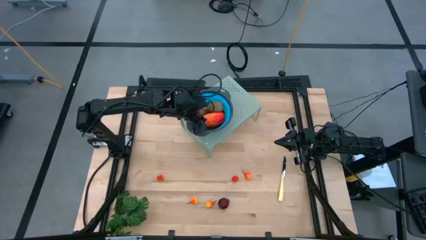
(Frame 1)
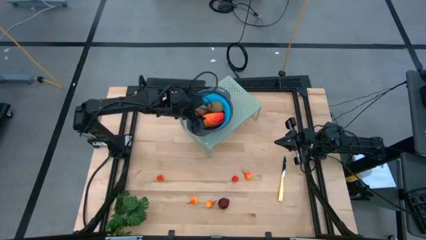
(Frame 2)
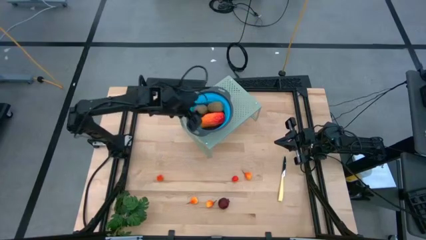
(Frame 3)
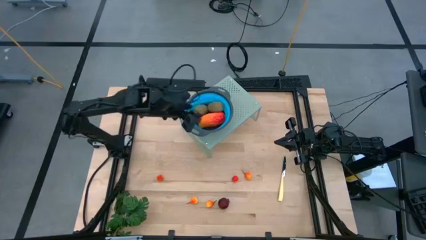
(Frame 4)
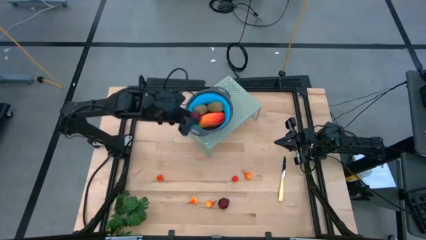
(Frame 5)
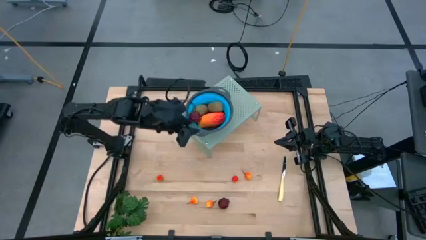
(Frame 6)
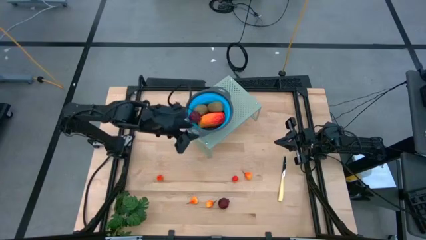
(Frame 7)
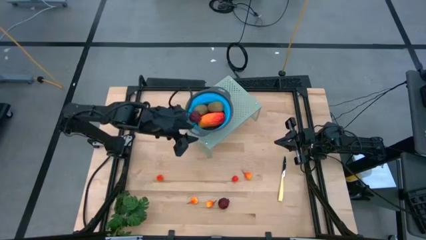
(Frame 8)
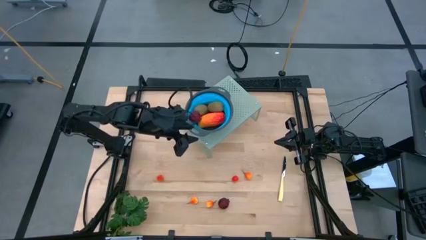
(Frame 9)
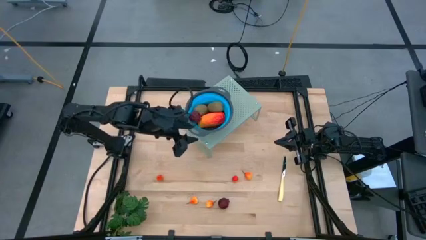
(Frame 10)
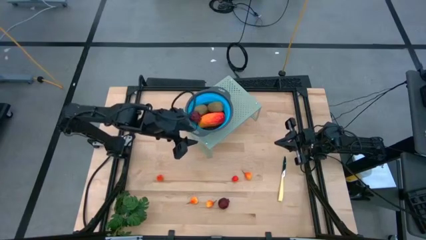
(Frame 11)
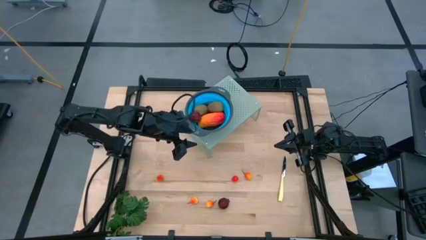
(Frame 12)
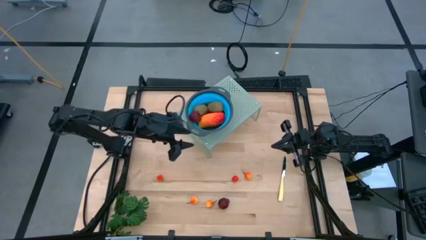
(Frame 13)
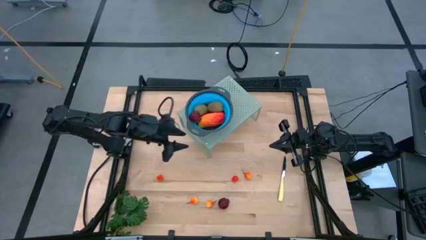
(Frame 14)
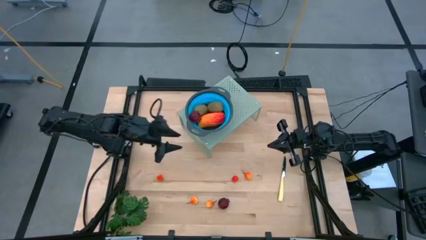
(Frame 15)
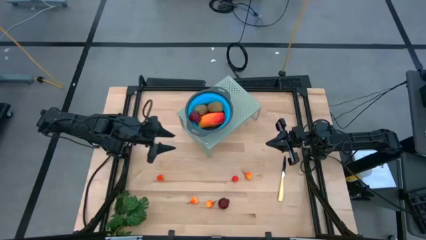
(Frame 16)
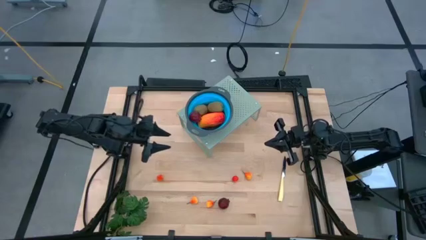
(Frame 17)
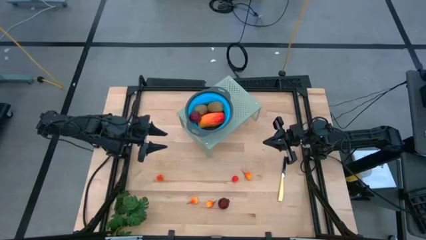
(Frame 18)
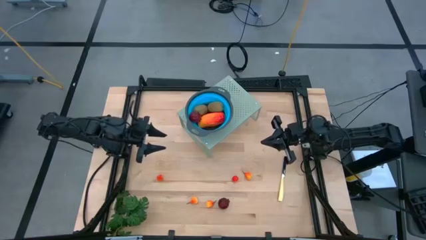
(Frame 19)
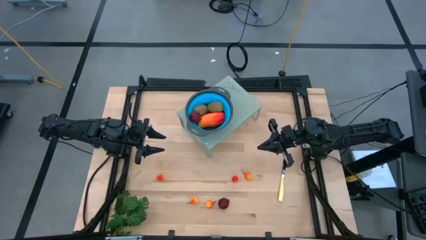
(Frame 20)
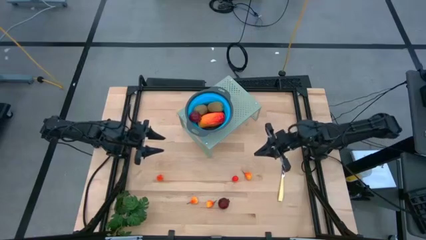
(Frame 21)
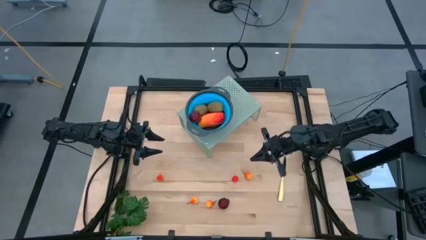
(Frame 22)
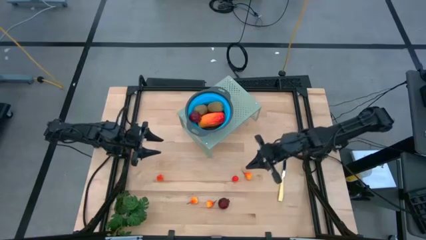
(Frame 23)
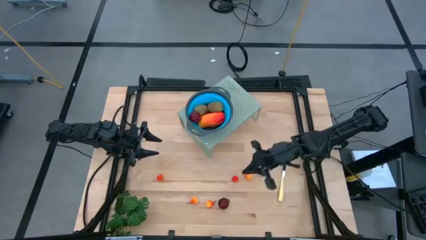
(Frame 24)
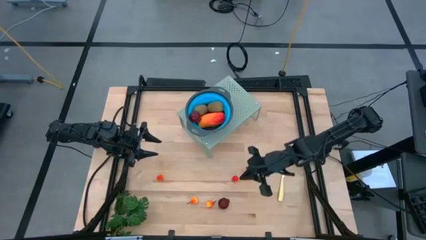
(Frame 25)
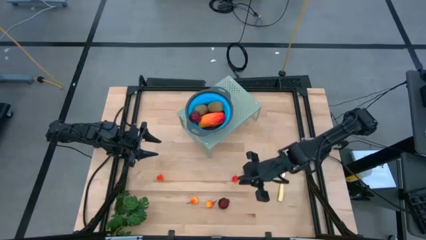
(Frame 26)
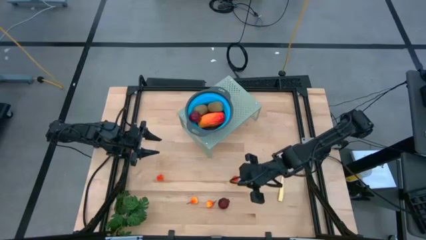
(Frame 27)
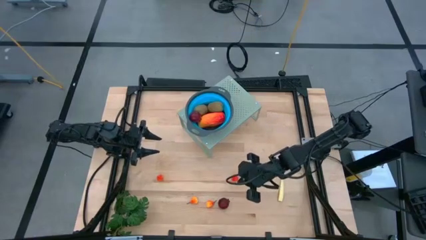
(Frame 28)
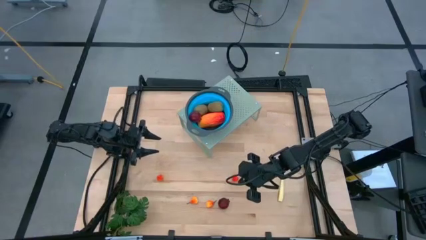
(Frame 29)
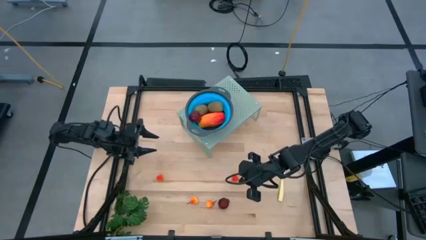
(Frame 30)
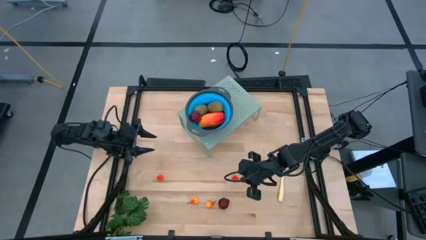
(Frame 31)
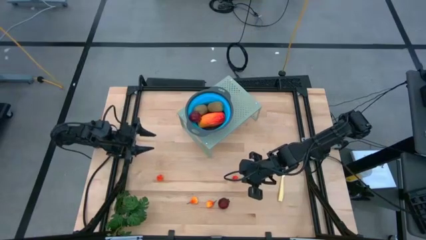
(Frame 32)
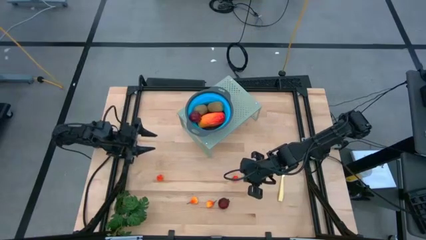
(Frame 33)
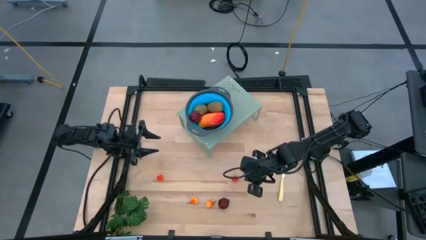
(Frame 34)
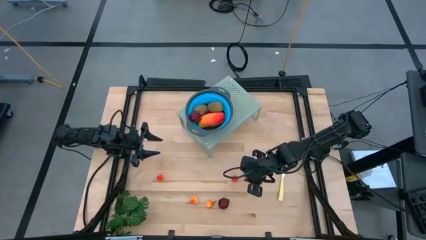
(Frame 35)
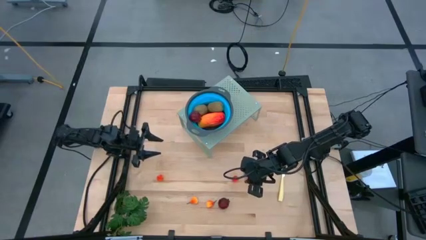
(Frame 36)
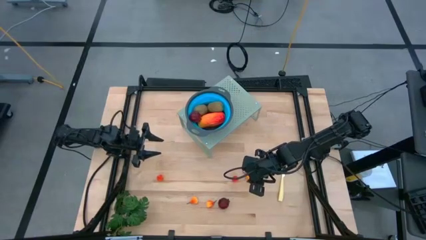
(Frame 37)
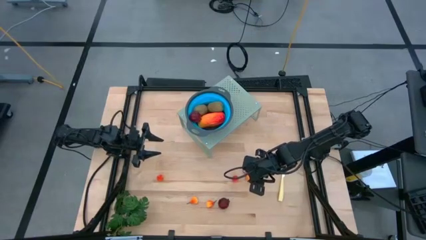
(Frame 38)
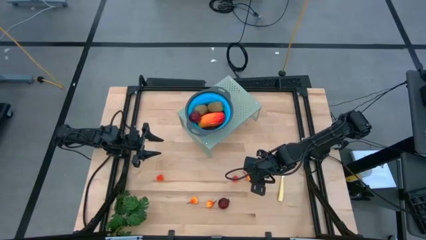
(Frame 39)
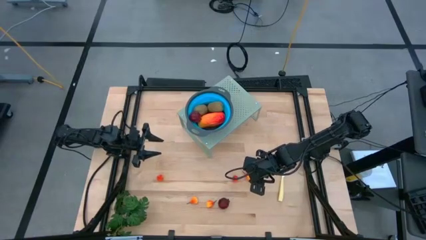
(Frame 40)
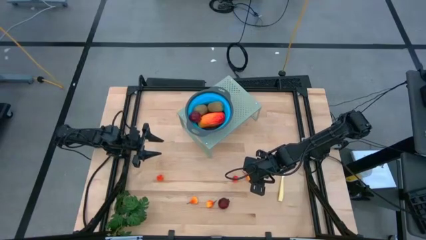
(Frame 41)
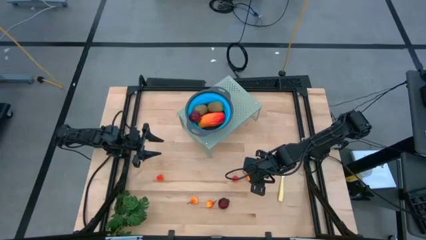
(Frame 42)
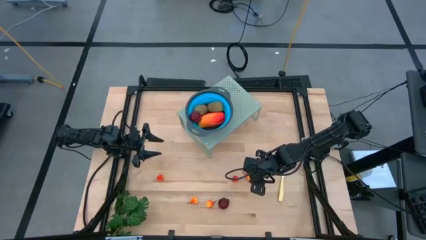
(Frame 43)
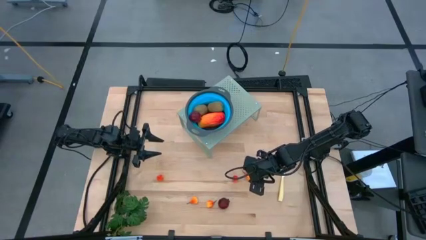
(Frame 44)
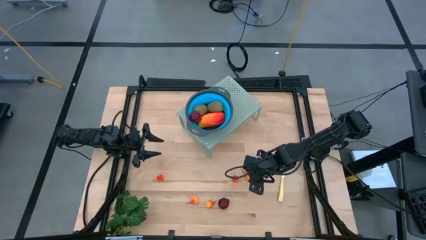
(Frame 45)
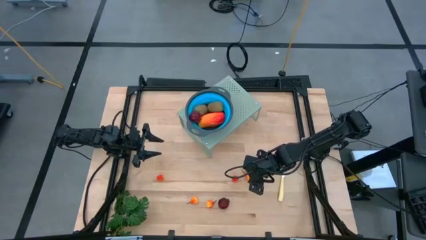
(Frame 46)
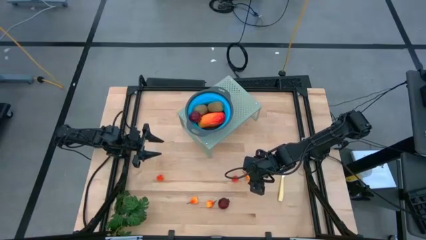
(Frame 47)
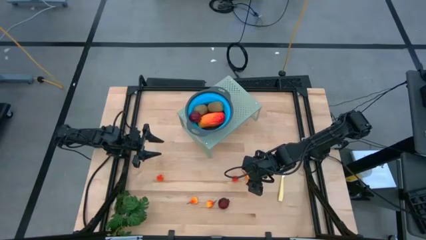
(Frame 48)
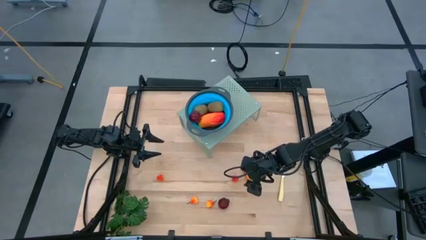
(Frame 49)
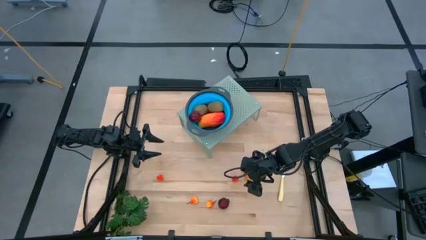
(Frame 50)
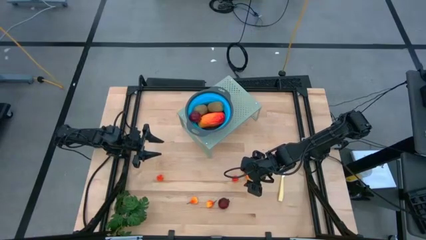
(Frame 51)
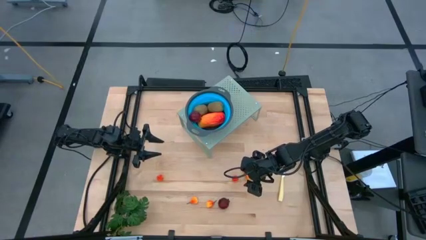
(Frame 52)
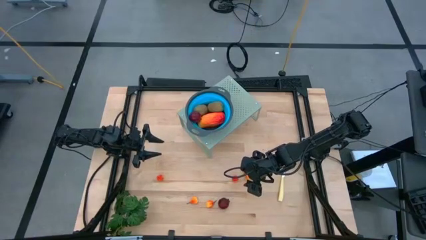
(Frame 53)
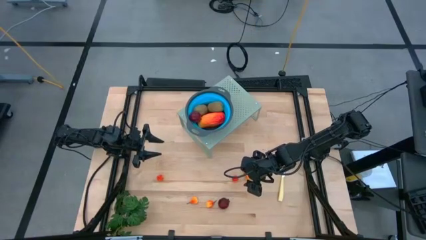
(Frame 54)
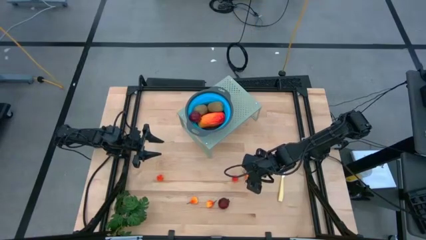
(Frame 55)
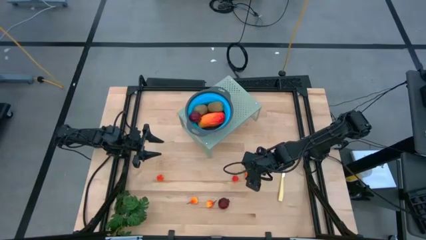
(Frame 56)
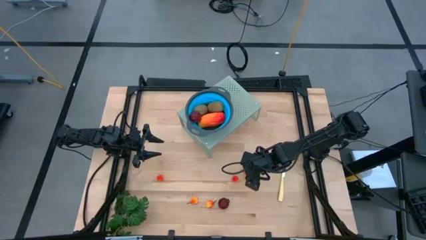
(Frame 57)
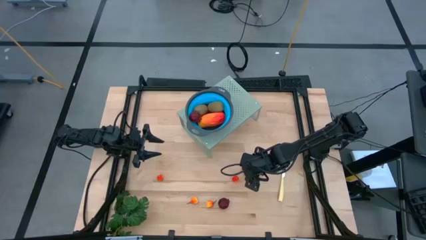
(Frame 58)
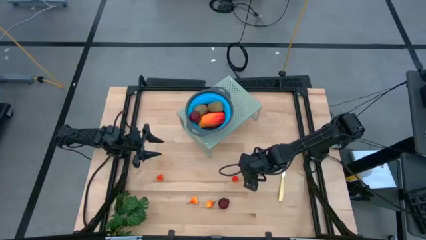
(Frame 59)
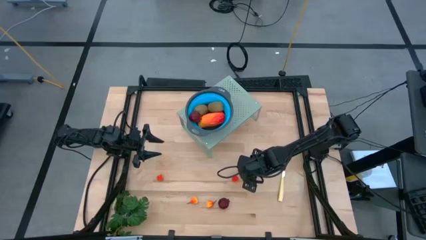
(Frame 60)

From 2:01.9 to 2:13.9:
Task: Pick & Place Fruit
Put the red yellow peach into the blue strainer bowl on the shelf
